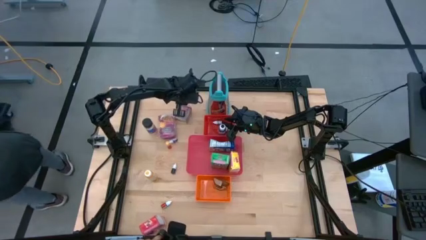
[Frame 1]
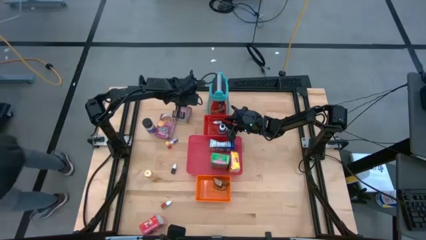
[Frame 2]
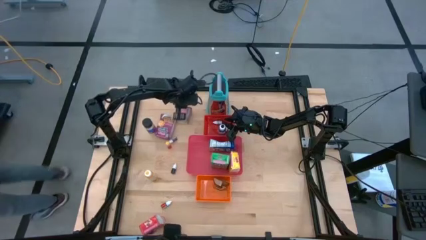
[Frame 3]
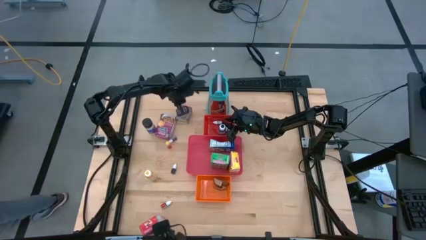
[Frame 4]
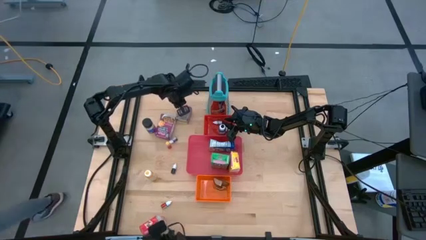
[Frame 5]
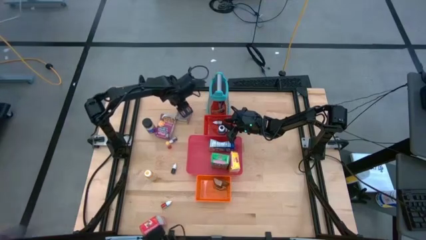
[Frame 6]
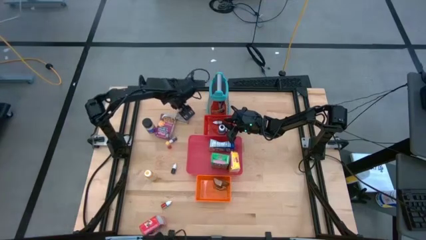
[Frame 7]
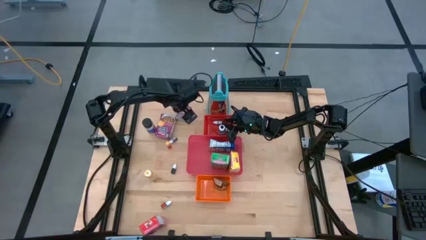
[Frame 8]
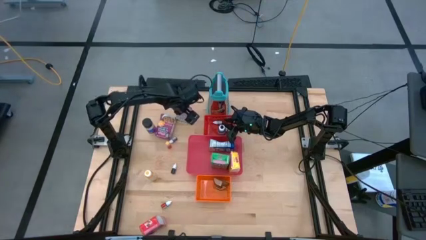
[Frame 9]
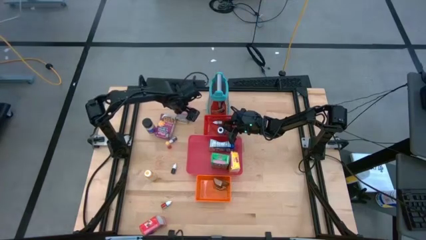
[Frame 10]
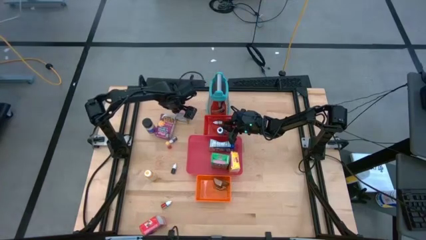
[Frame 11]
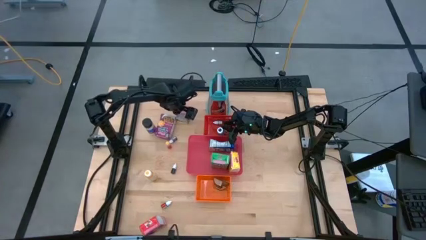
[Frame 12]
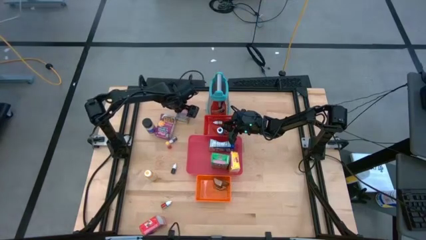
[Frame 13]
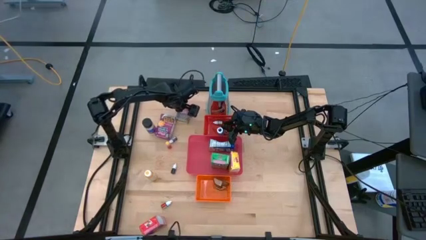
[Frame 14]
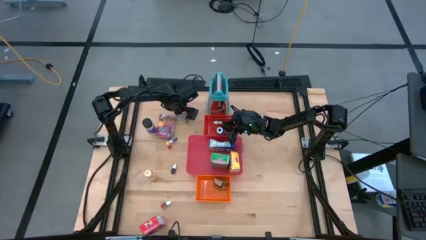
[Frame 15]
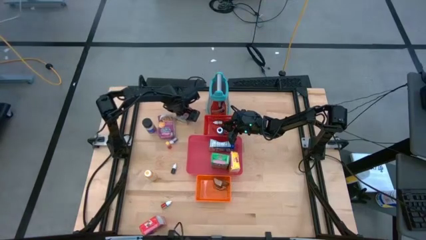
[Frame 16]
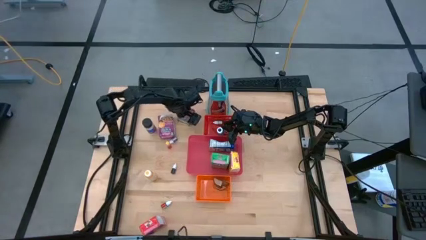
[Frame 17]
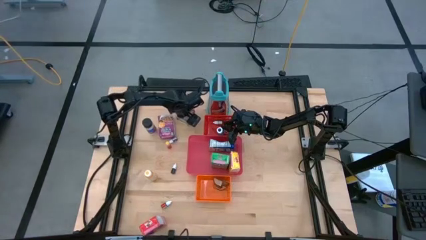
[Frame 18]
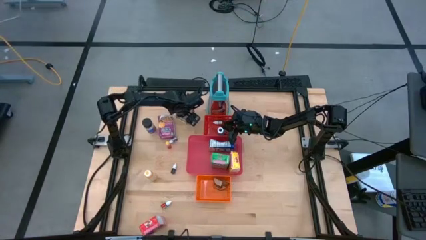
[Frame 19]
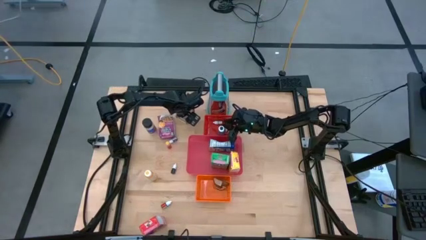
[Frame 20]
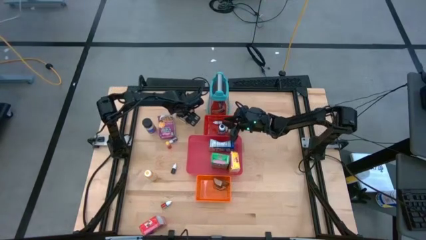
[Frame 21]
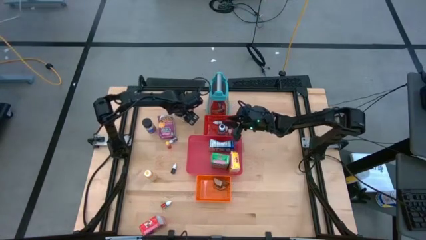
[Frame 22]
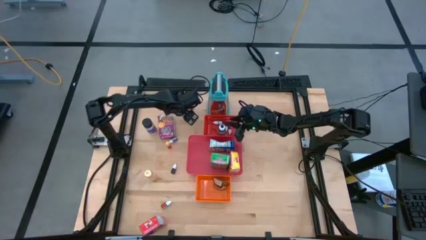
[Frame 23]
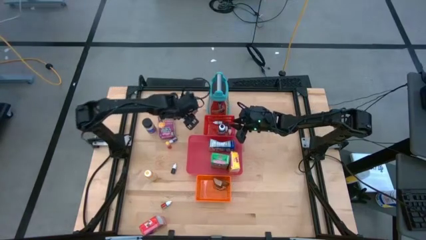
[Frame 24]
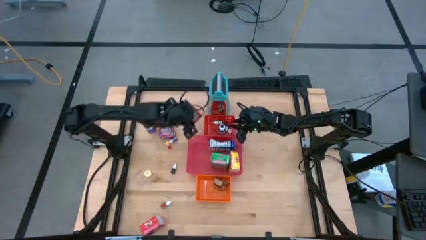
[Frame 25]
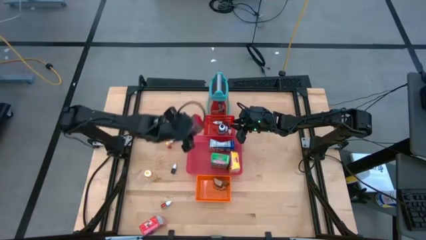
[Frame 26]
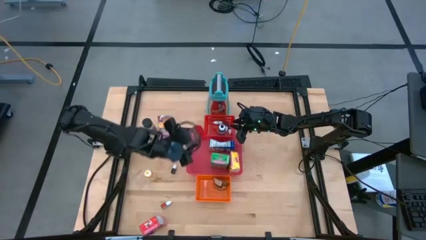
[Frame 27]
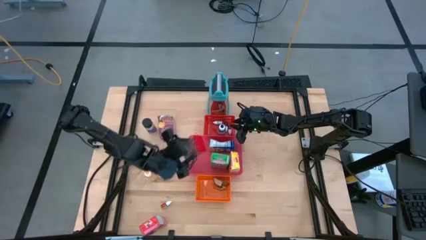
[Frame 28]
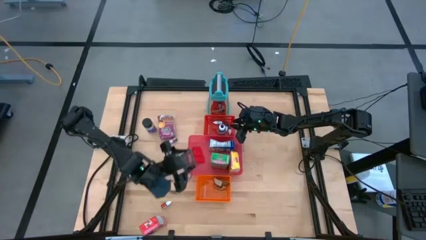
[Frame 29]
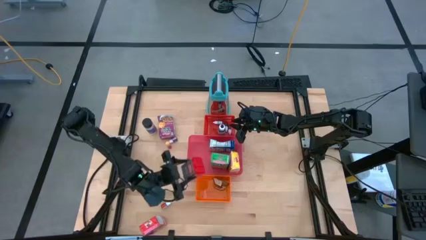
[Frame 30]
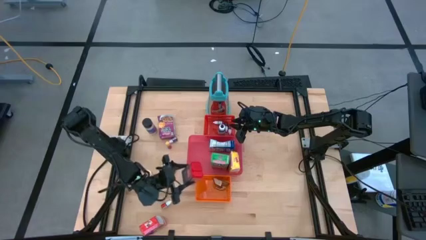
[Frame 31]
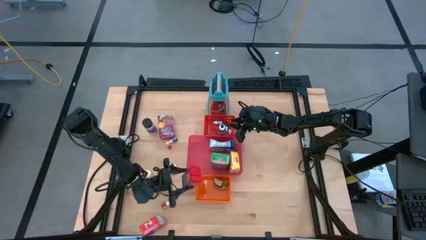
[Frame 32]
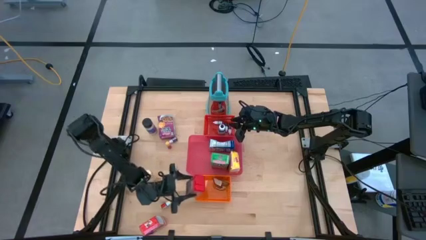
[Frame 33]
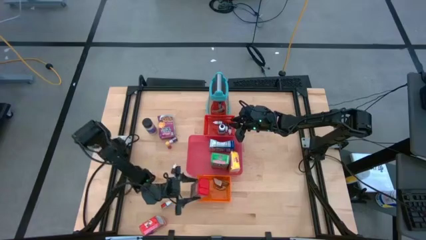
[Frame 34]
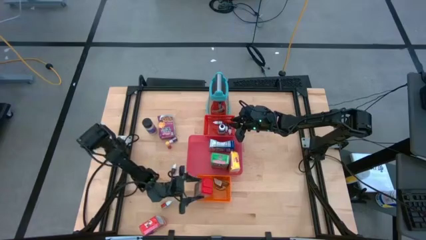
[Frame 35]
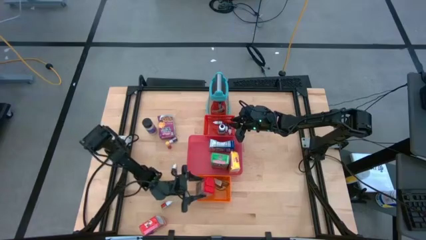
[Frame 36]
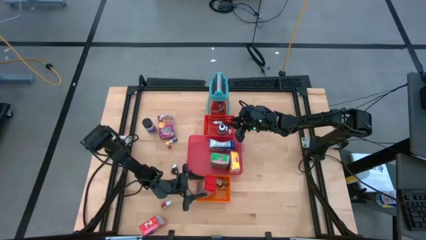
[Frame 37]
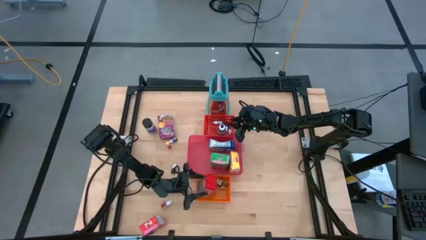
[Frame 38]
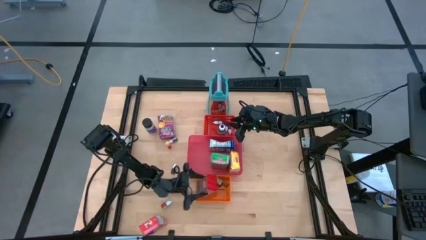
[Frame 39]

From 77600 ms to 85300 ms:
Task: Pick & Place Kitchen Items
Put the red seasoning can into the orange bin

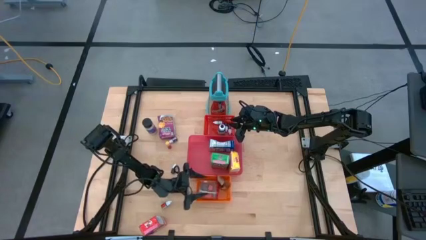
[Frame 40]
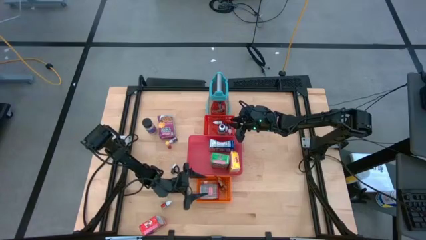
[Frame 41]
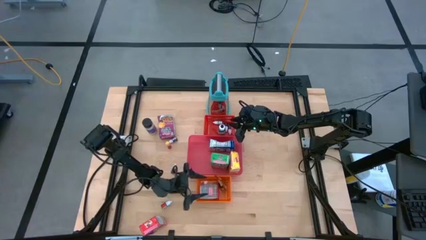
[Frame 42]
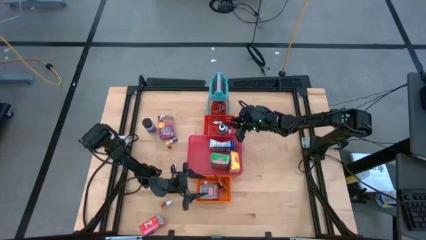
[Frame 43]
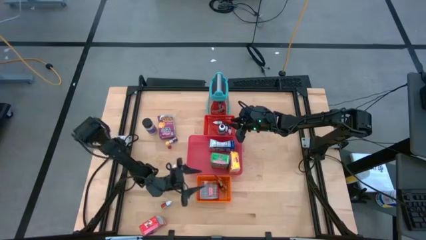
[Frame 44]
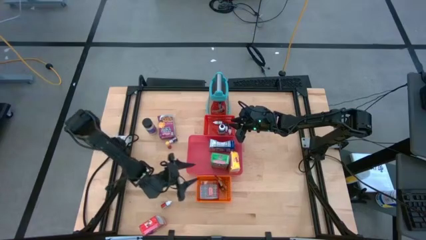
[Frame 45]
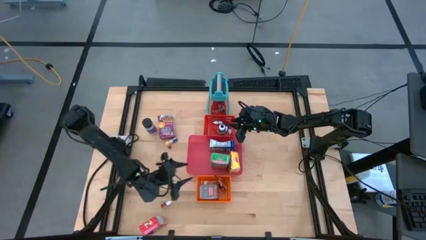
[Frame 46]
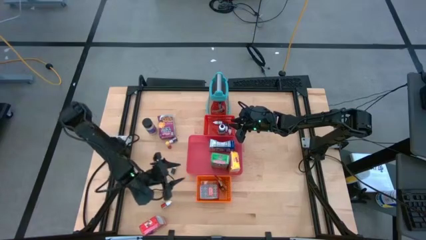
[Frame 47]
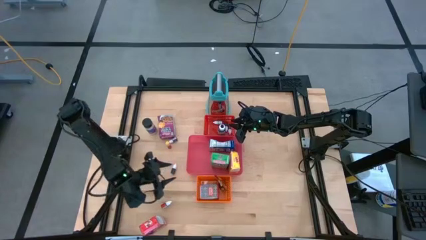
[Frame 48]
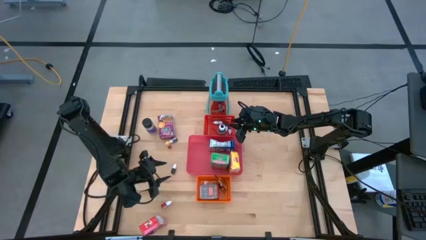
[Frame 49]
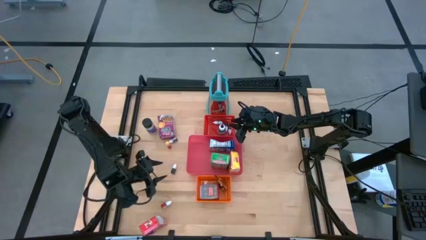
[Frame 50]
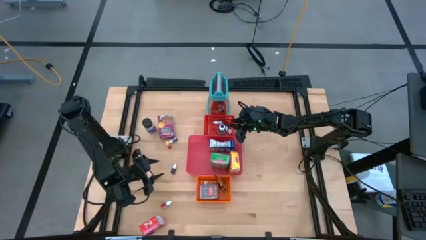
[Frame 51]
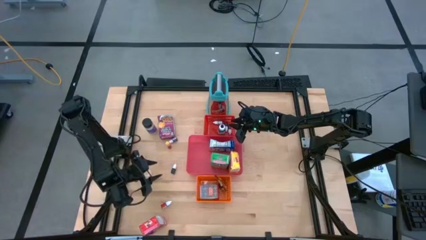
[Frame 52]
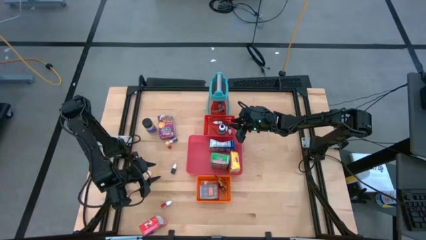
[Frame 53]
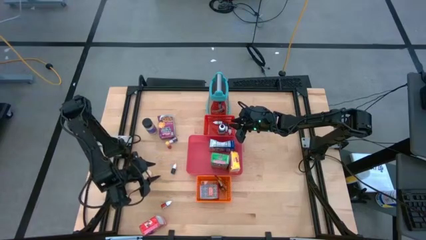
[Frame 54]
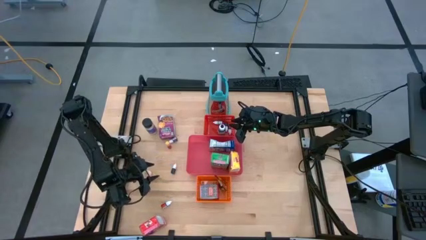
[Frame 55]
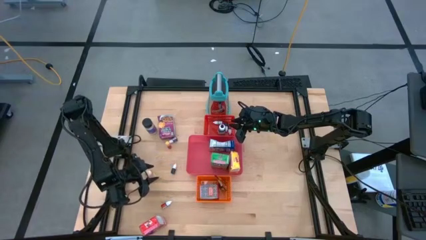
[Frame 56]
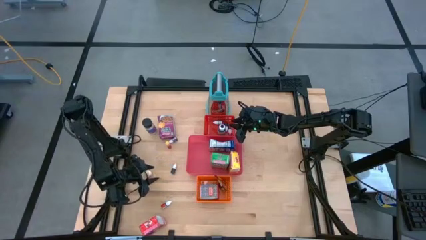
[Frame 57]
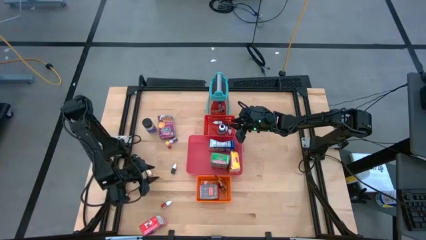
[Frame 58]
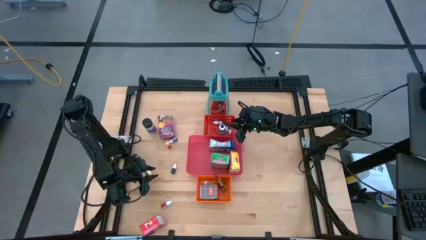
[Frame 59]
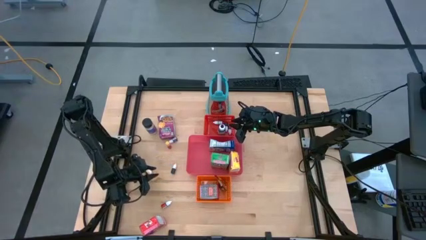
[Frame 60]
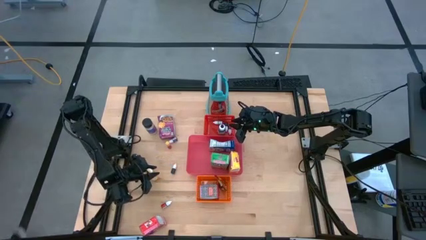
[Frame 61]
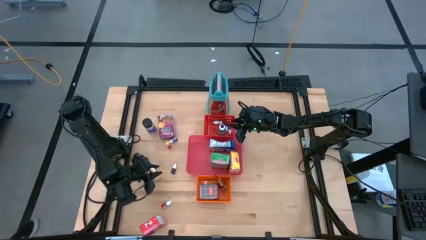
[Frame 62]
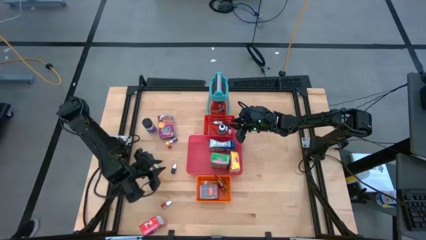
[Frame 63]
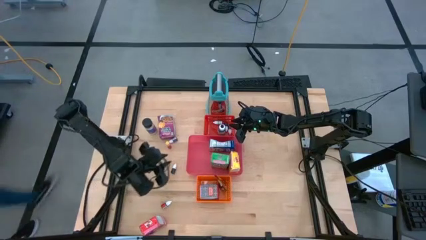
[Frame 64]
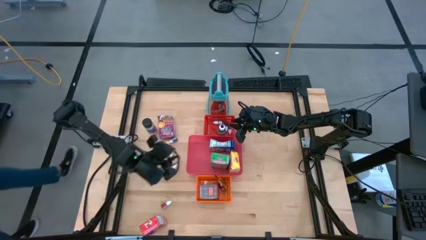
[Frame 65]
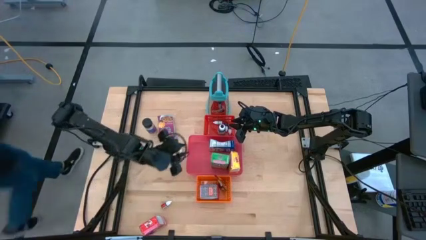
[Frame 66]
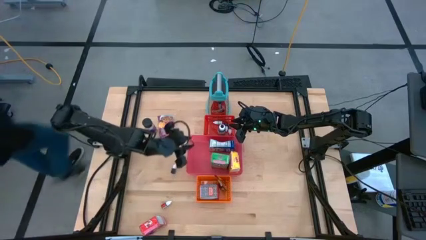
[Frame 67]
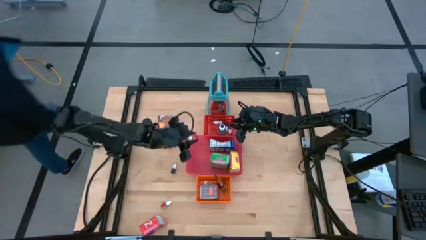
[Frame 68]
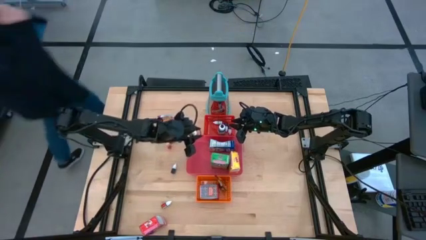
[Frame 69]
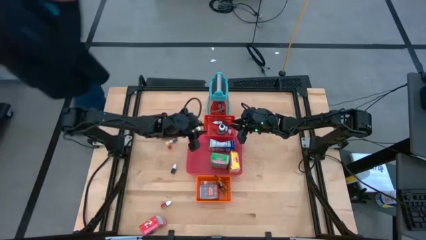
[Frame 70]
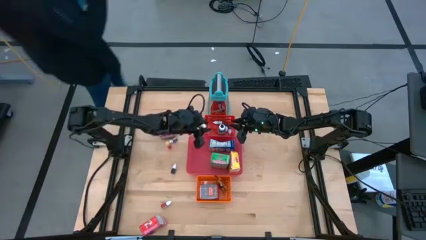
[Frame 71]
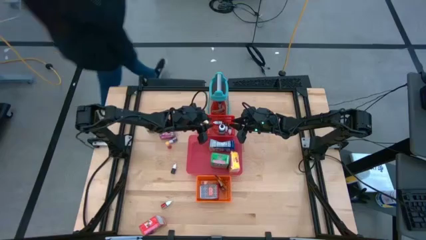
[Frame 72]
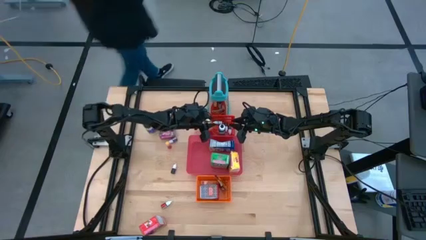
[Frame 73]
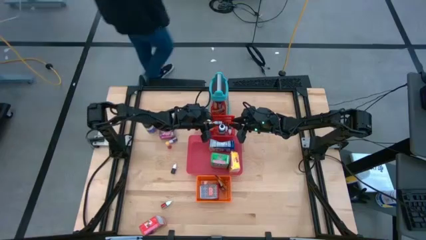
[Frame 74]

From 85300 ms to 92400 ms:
Put the big yellow food coloring bottle into the red bin
